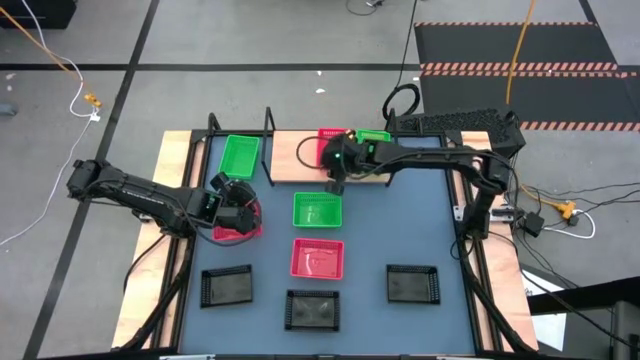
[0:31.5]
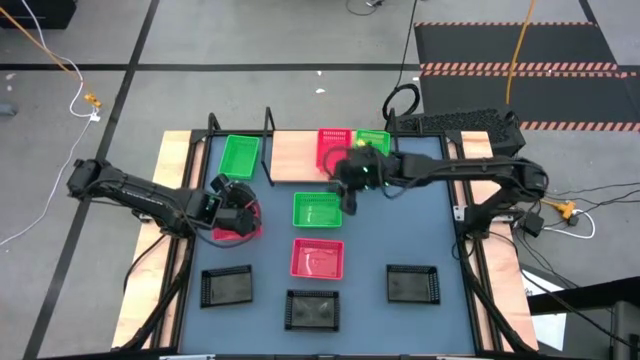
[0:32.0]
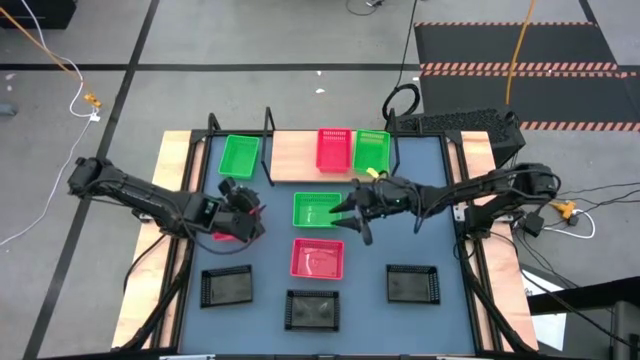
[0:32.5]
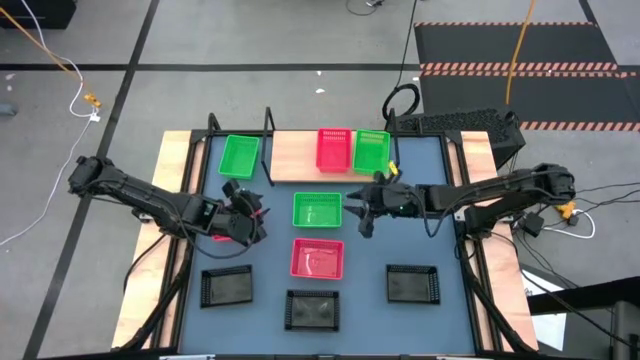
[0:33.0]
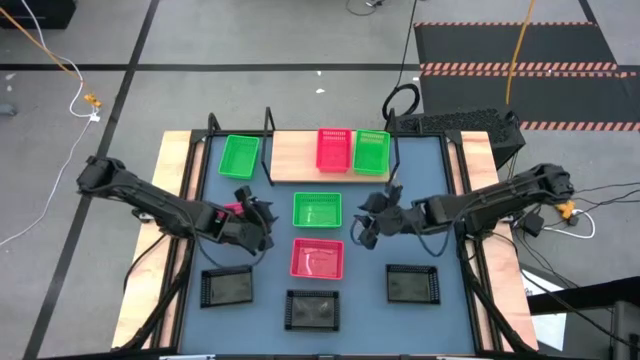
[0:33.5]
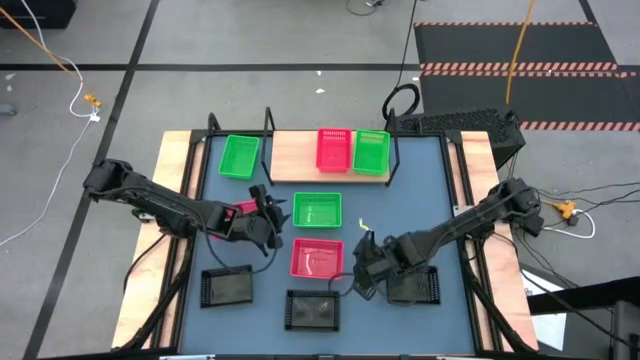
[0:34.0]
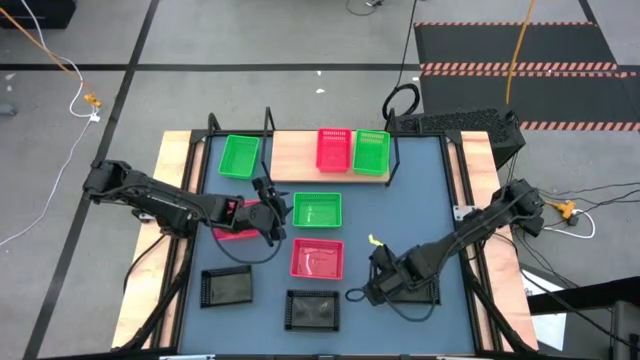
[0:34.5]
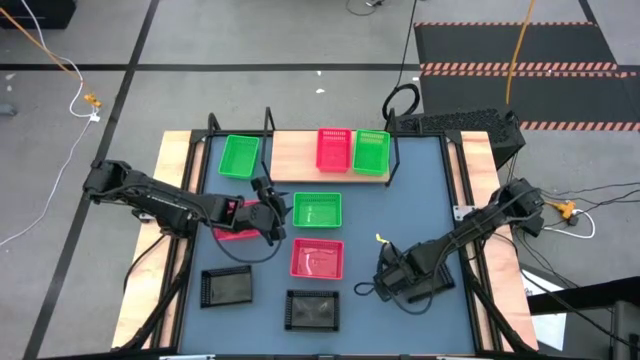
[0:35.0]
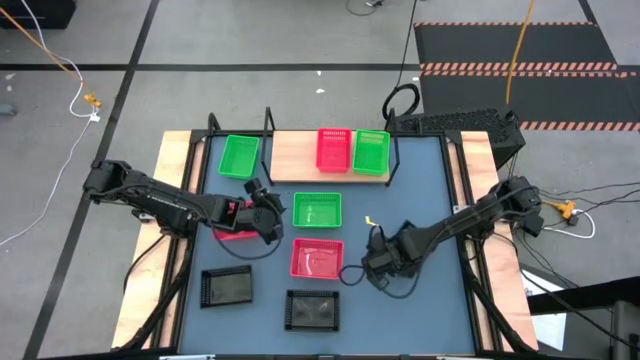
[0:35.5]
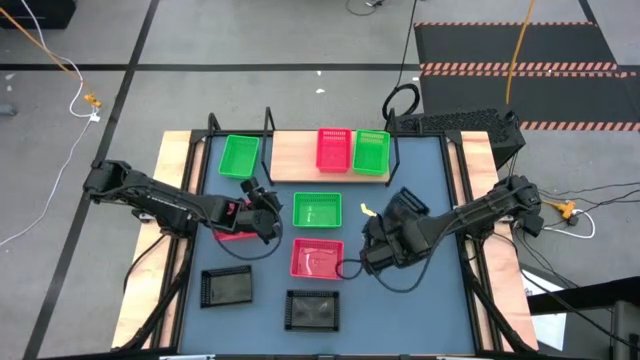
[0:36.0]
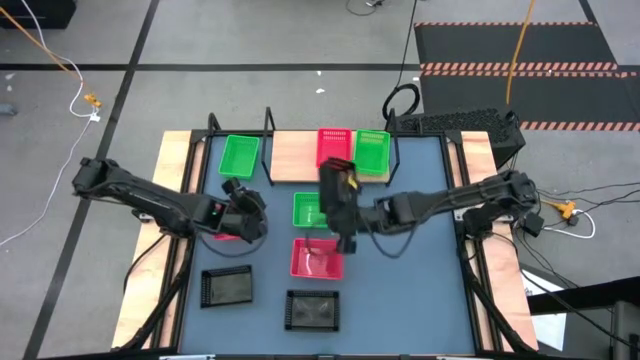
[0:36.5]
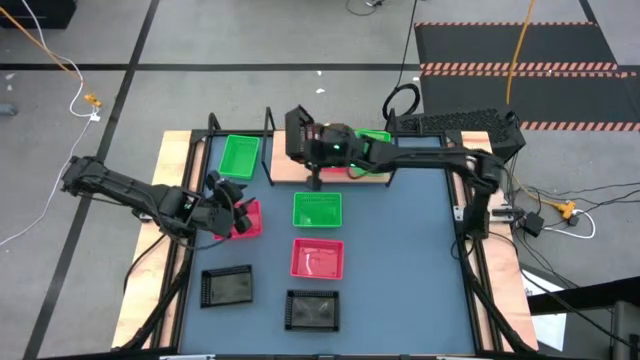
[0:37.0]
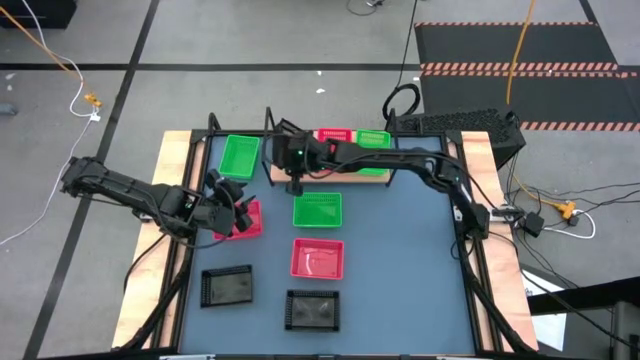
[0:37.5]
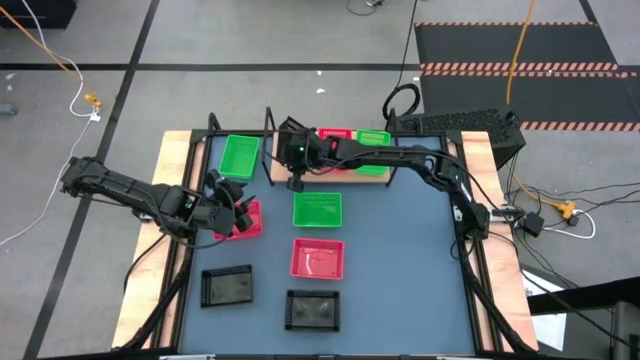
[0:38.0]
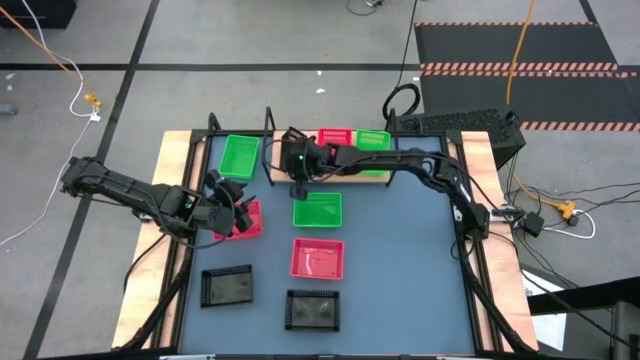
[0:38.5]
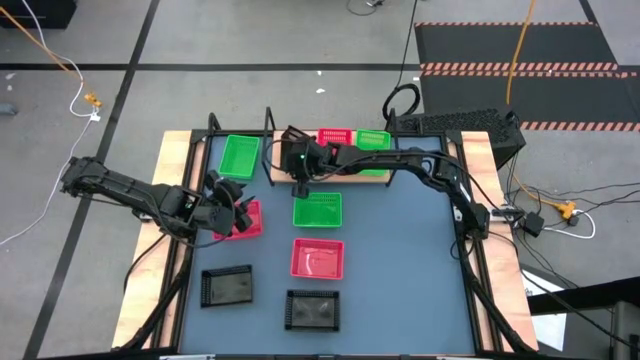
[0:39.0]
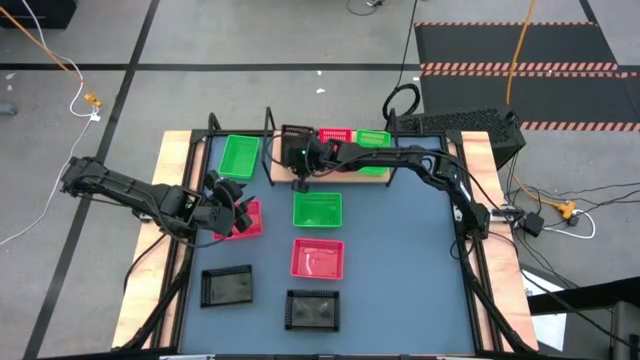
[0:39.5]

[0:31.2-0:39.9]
Task: Stack baskets on shelf by color
Put the right black bin on the shelf

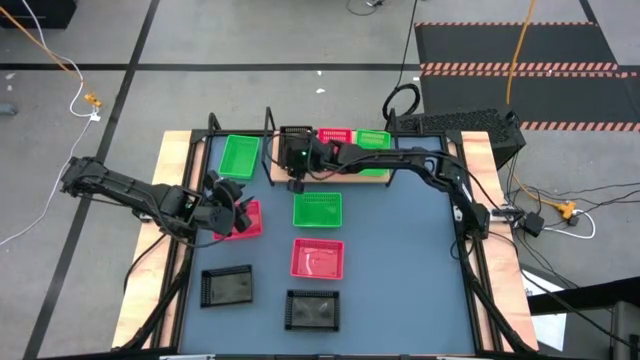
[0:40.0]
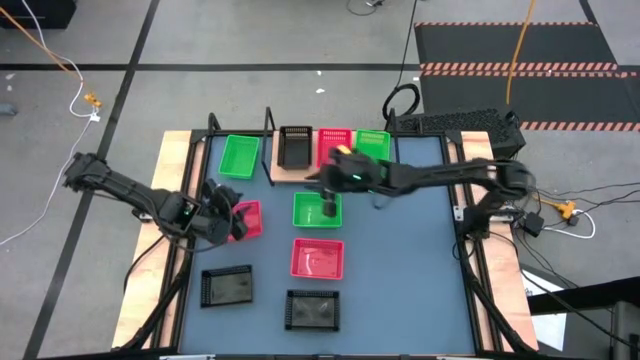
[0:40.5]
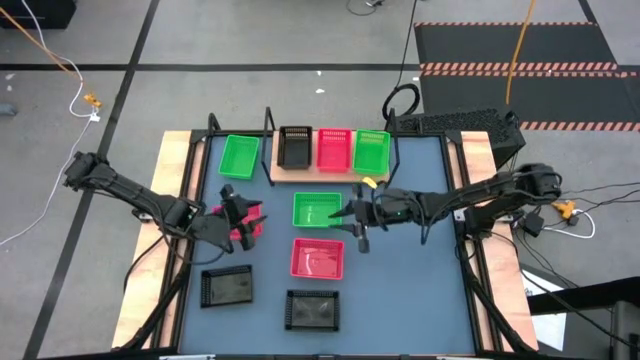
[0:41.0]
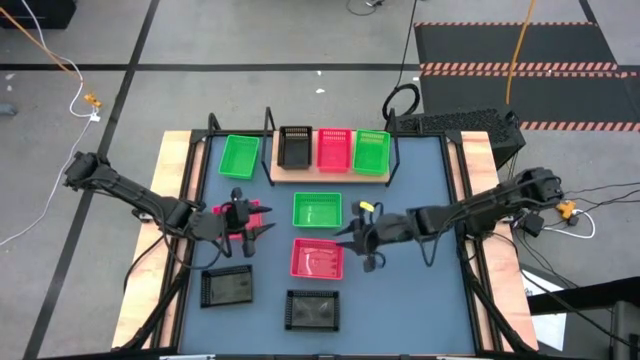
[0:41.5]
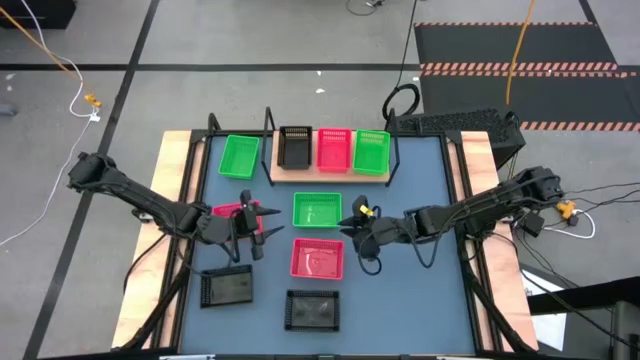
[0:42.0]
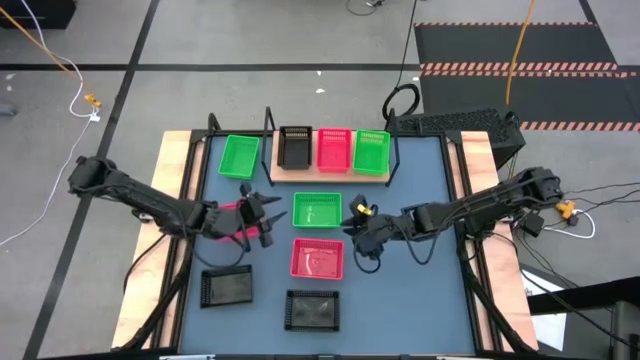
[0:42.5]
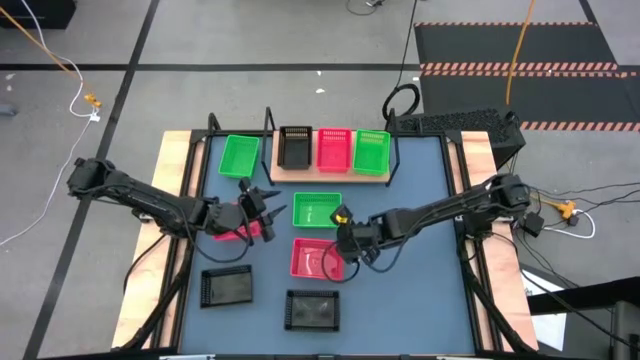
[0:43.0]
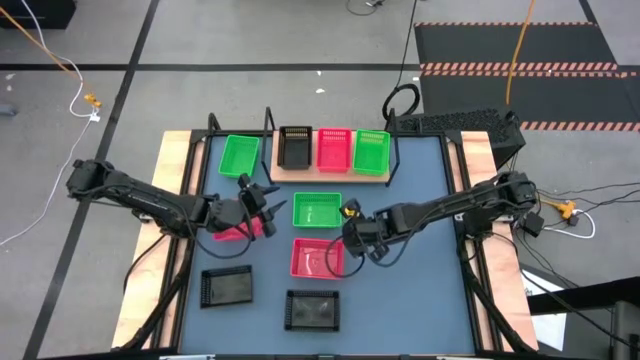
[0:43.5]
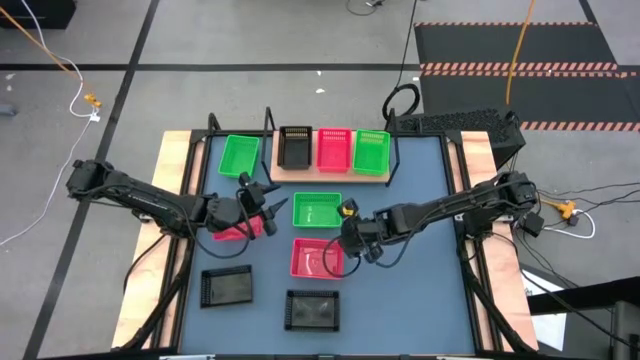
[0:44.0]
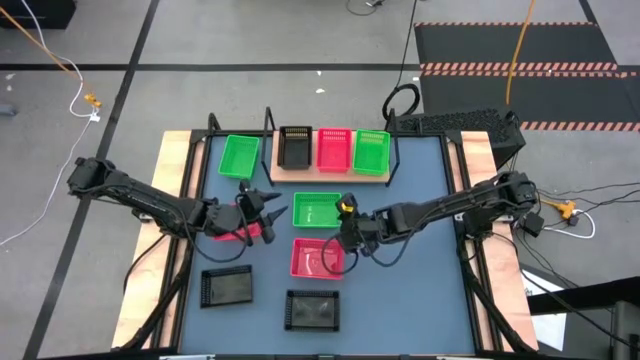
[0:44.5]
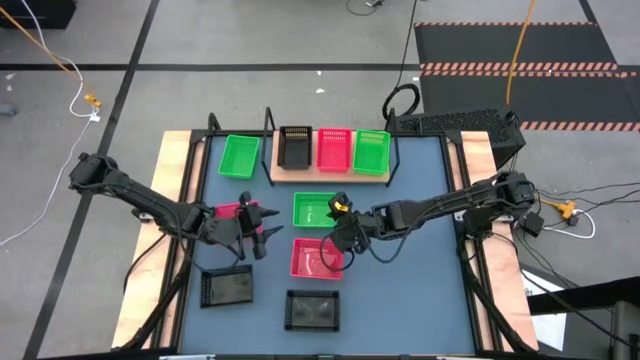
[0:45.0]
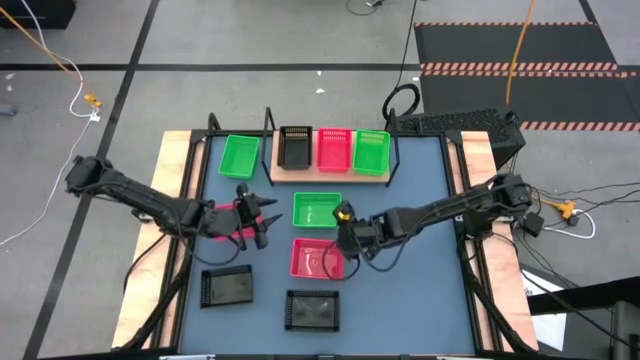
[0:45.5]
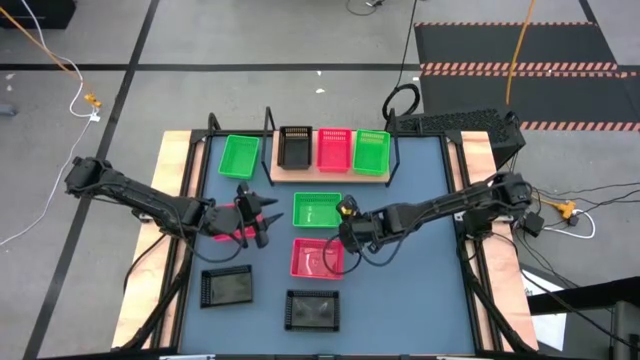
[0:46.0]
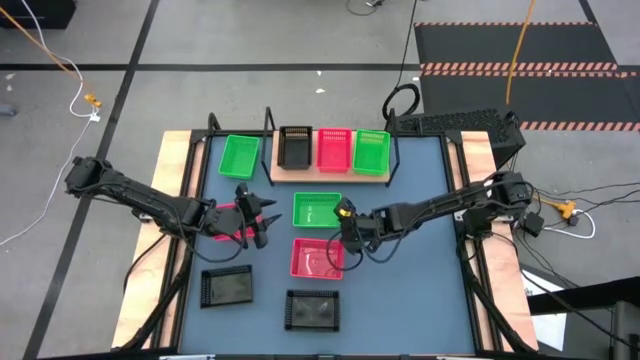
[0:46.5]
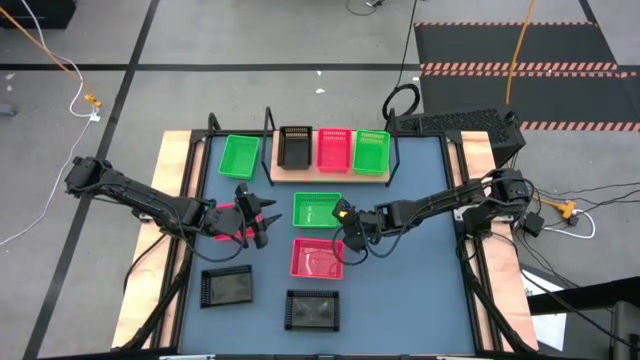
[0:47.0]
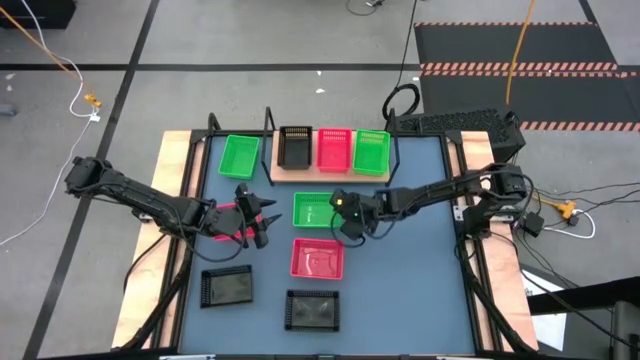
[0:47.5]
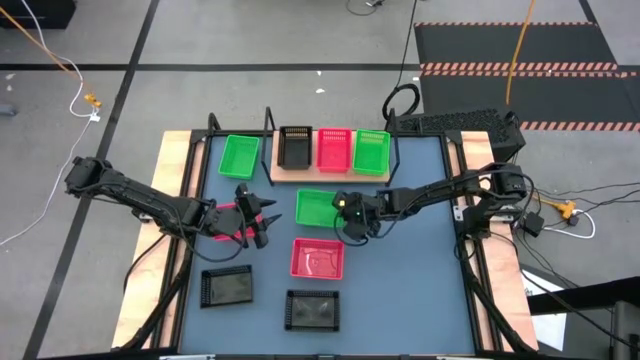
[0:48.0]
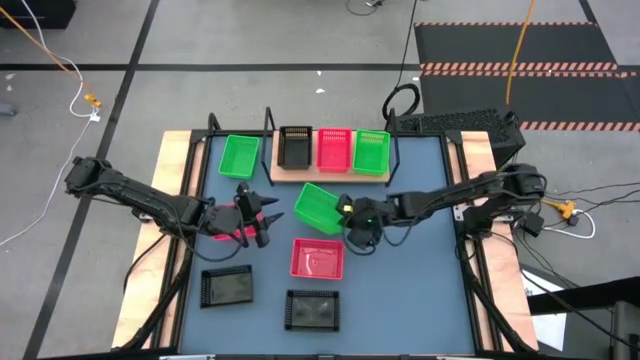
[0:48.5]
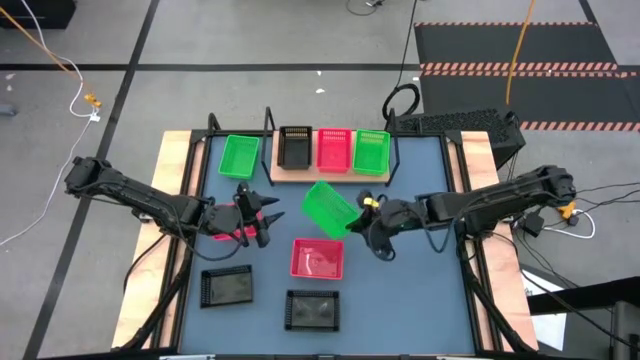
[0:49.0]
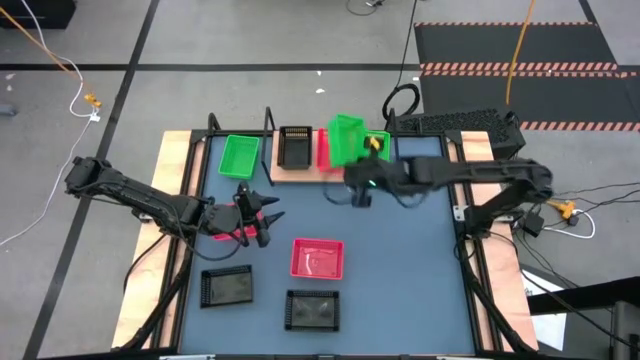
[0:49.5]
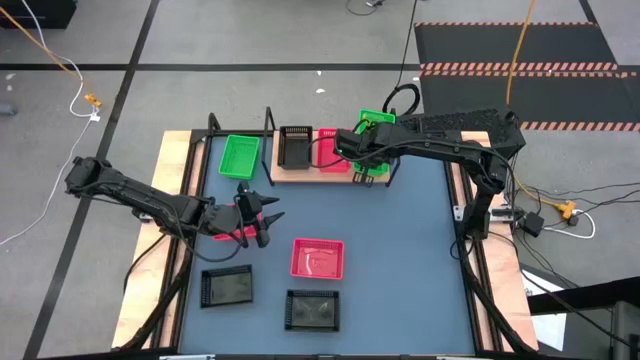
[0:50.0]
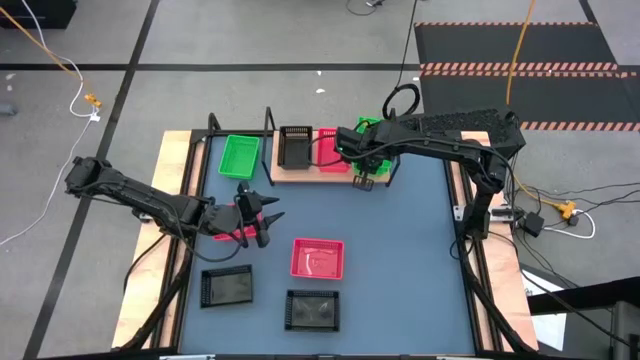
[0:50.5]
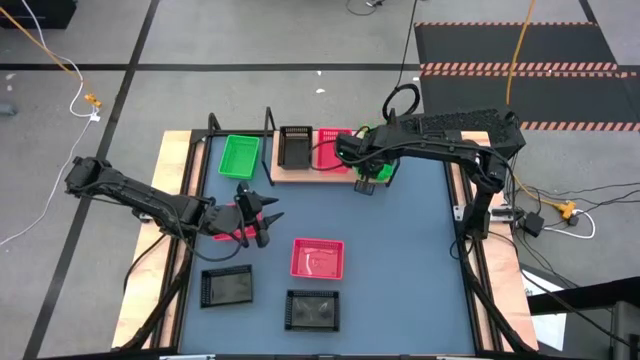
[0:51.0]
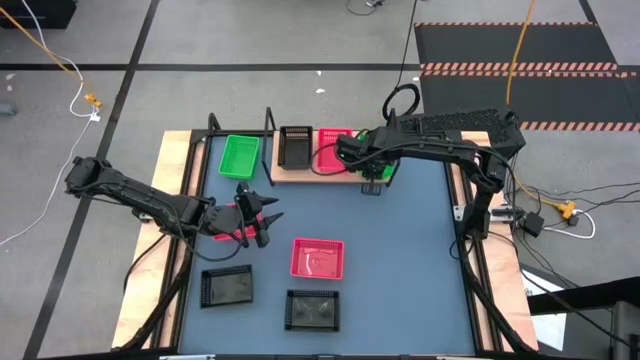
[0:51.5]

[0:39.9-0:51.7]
Stack the bottom green bin on top of the green bin on the shelf

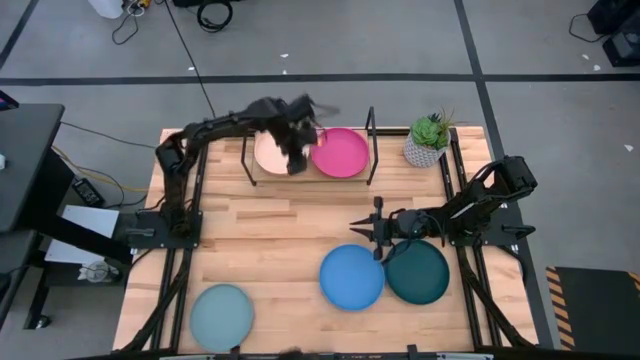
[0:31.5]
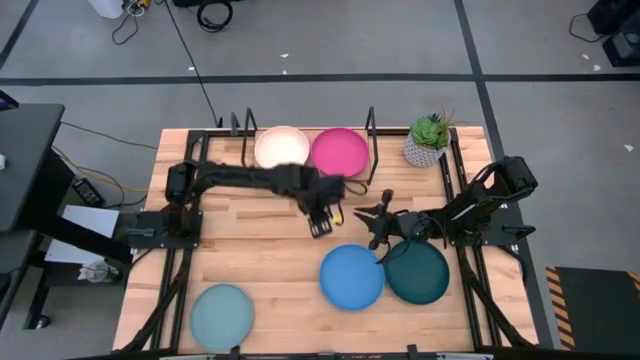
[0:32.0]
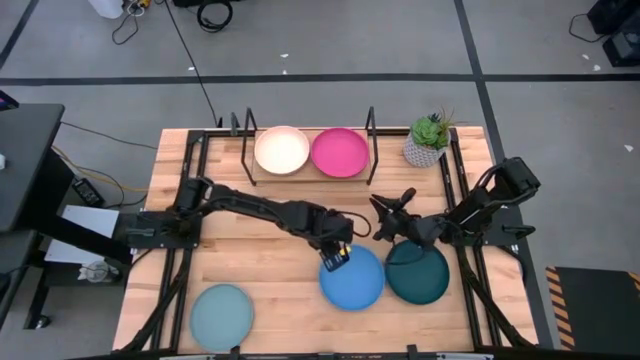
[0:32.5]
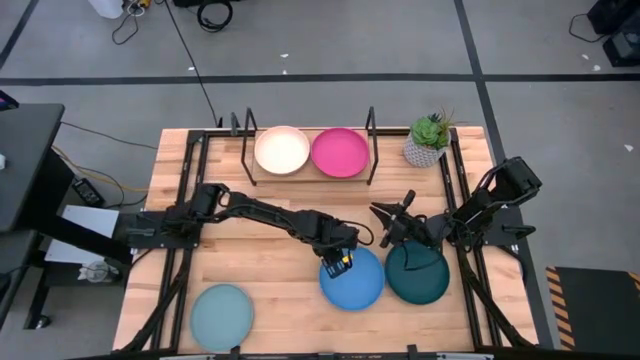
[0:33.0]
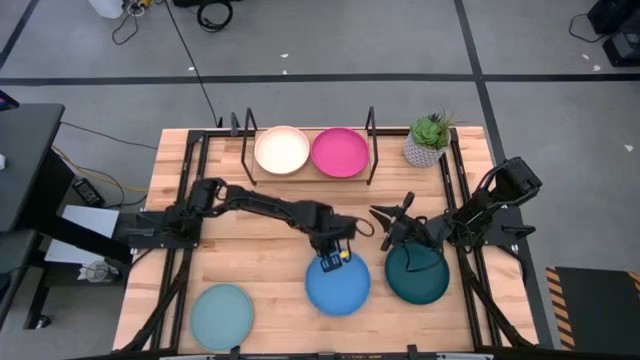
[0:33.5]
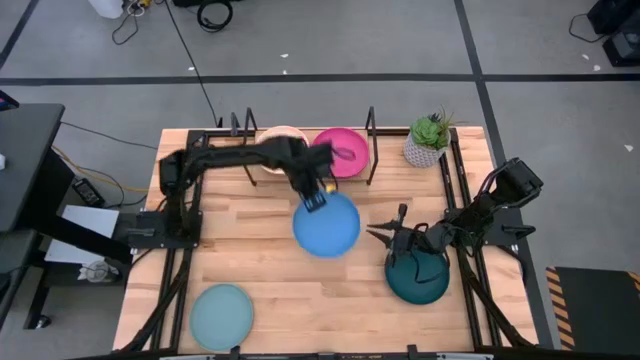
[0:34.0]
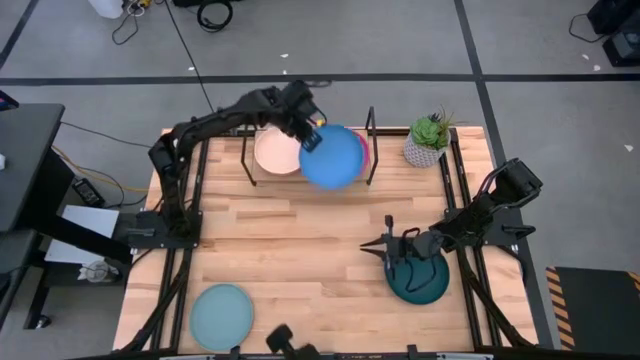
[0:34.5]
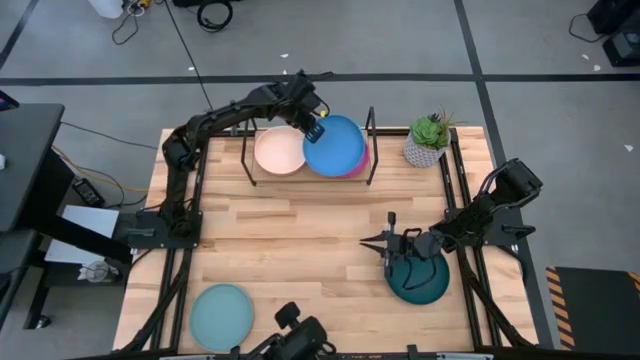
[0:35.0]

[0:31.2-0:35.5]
Task: Place and stack plates onto a shelf
Stack the blue plate on top of the pink plate
